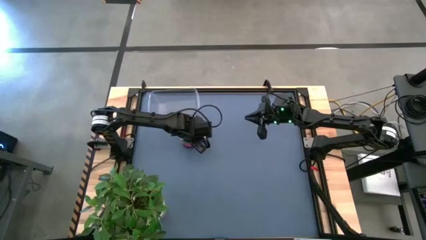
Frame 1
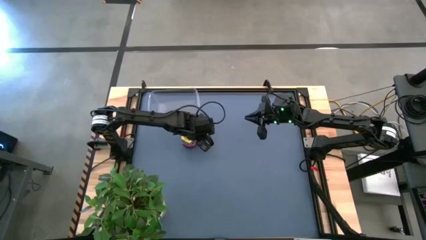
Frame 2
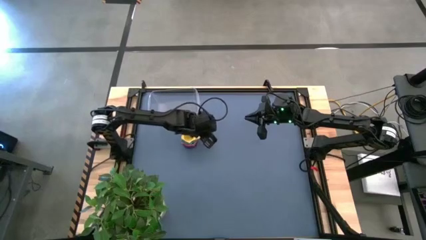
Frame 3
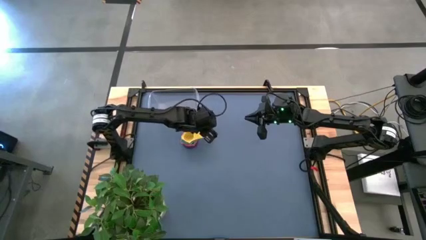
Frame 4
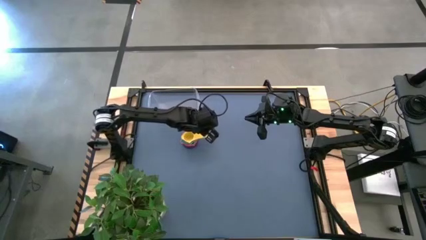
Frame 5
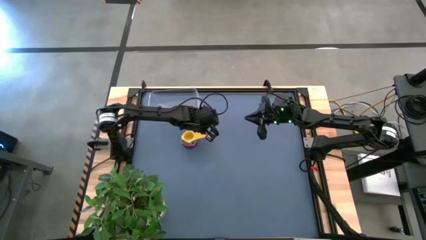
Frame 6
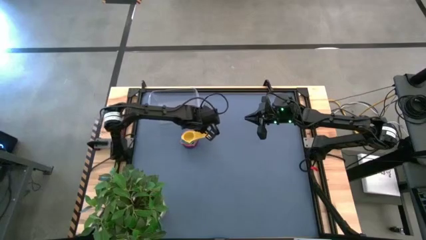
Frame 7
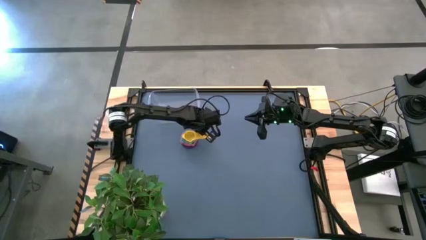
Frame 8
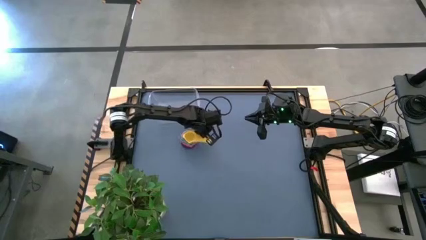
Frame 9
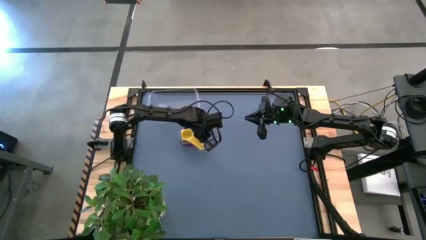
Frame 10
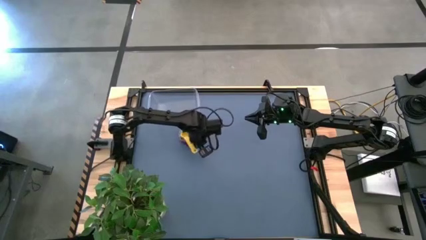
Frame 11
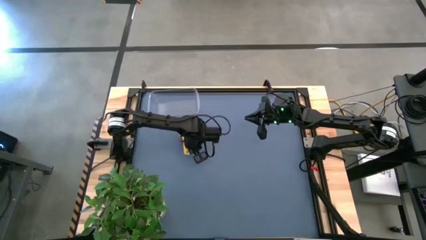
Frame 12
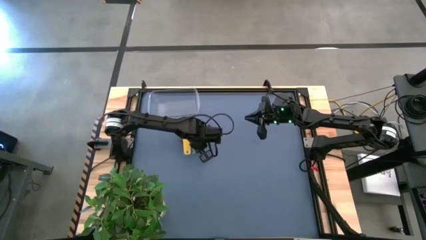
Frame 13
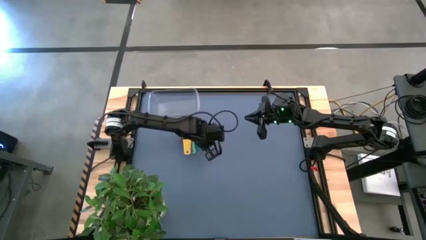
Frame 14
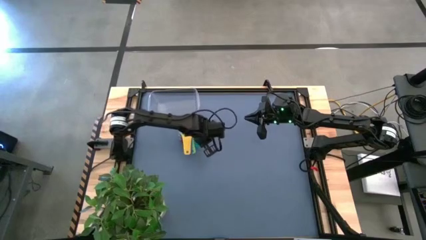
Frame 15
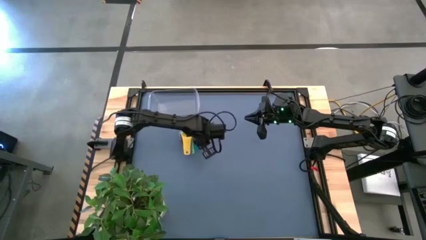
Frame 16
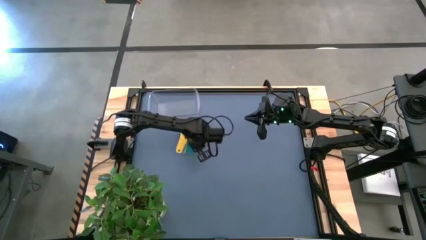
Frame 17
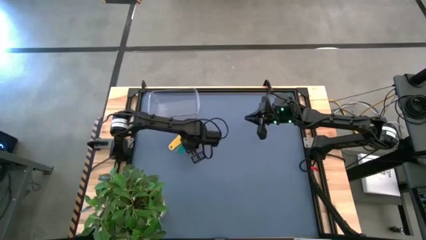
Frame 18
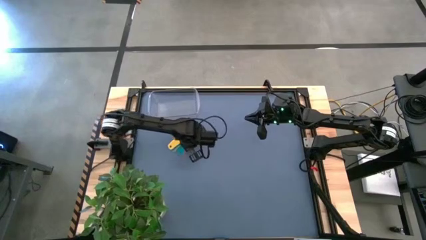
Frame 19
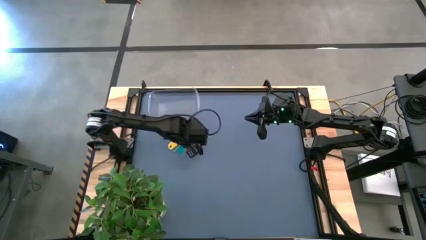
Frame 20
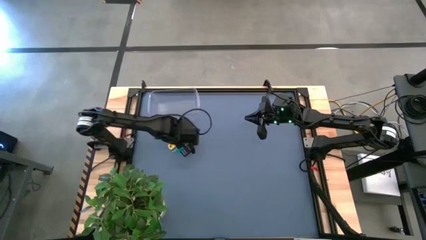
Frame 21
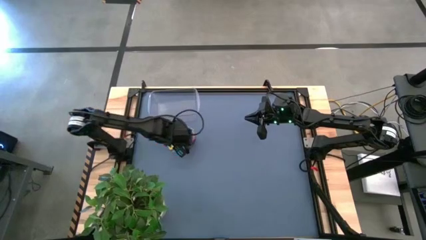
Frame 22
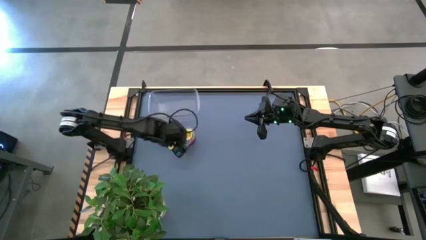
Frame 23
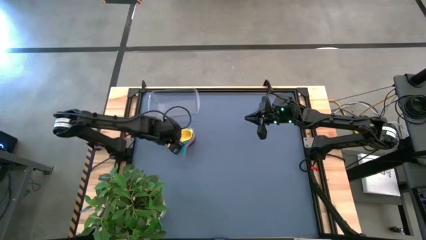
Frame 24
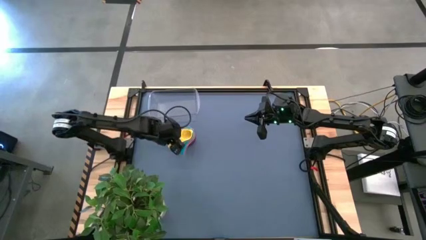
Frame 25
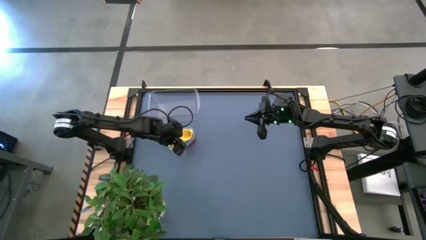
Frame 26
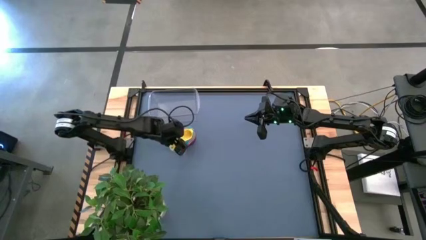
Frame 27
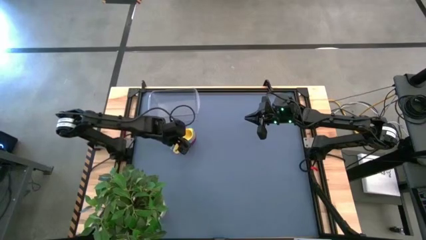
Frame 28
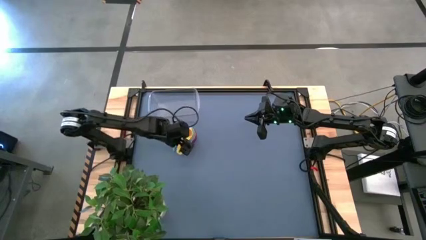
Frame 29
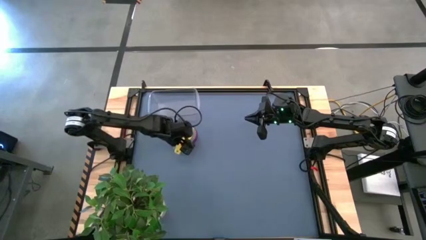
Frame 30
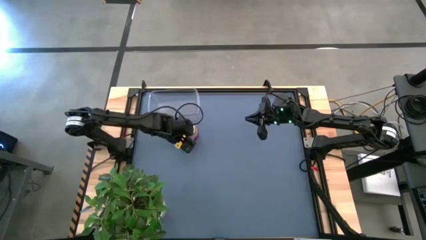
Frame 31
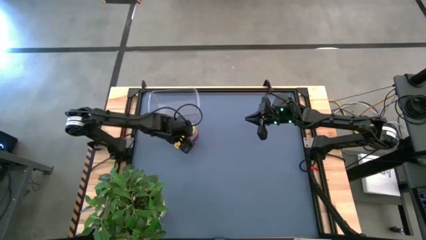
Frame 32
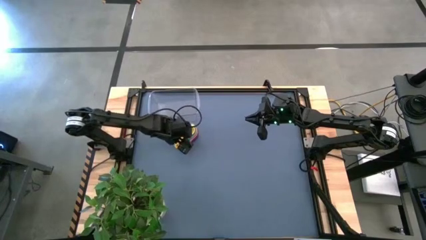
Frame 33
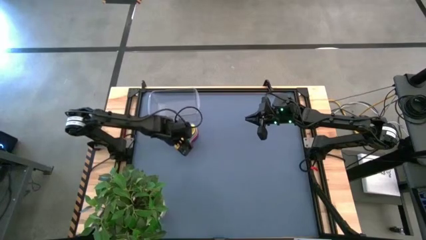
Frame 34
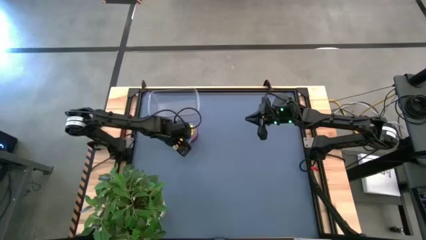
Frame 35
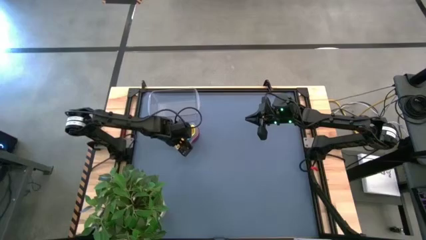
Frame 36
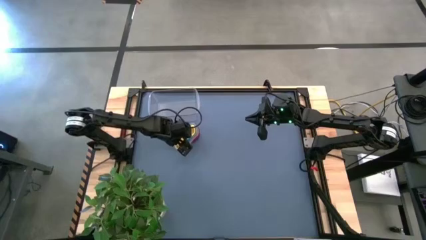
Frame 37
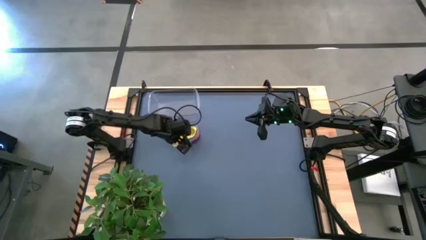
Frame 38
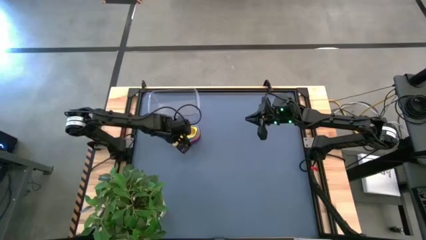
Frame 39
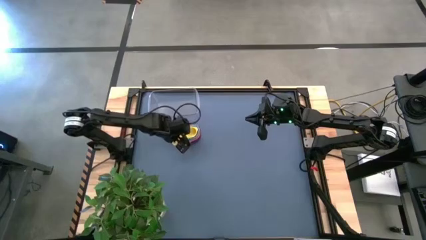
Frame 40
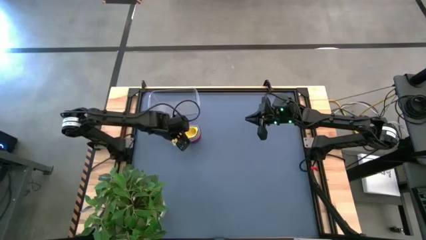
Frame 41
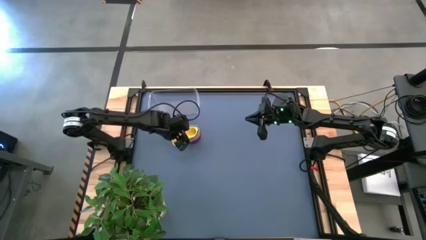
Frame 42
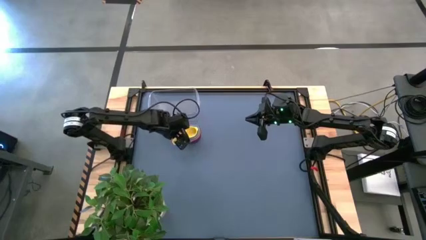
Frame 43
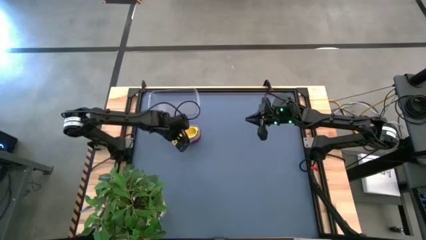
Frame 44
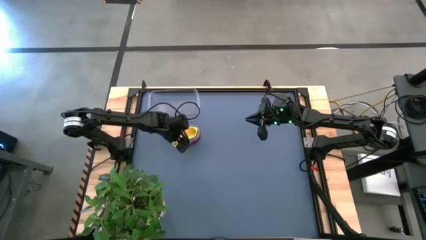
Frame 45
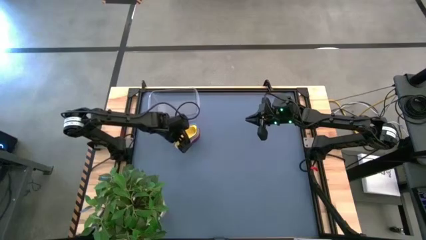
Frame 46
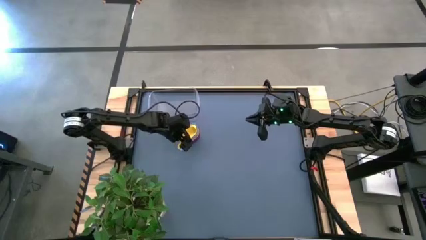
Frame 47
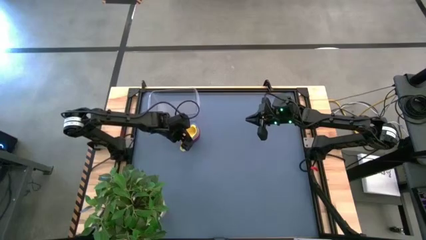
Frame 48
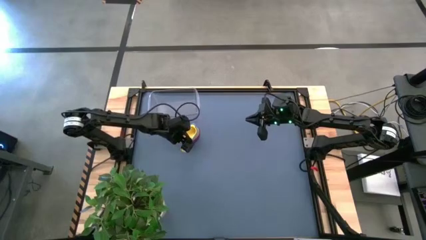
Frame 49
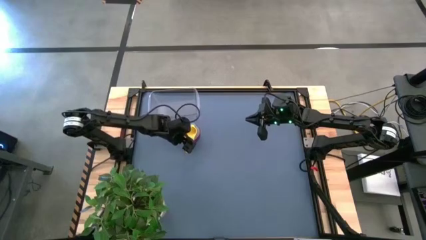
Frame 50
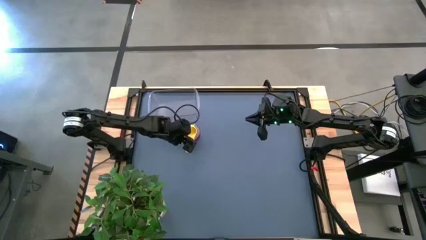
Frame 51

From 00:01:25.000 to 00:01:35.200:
Task: Nest measuring cups in basket
Adjust the nested measuring cups

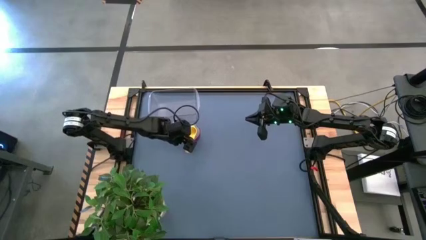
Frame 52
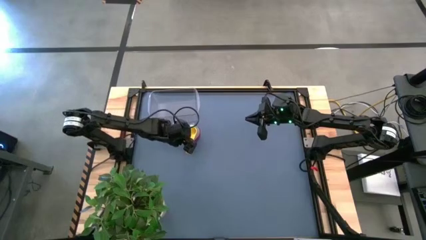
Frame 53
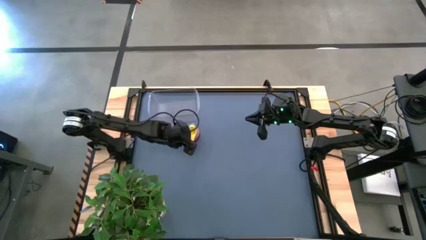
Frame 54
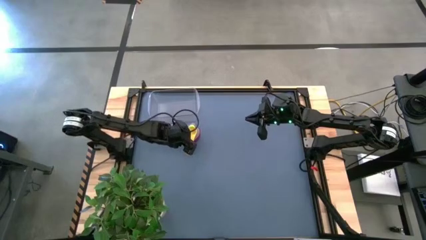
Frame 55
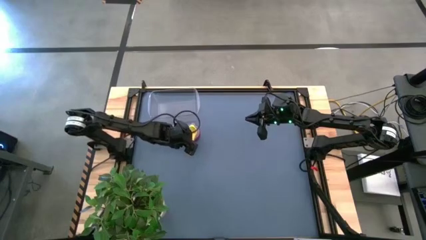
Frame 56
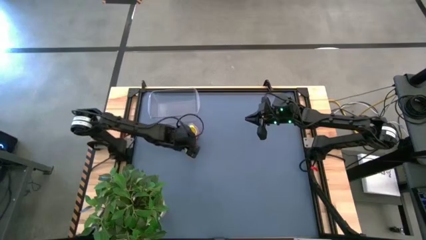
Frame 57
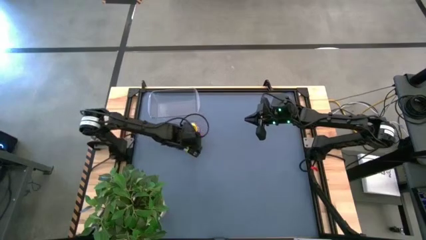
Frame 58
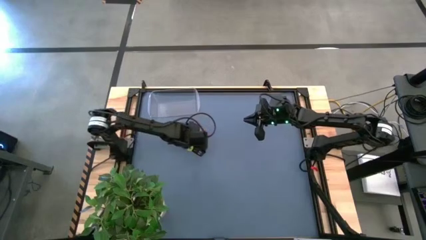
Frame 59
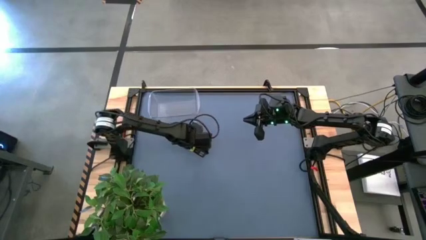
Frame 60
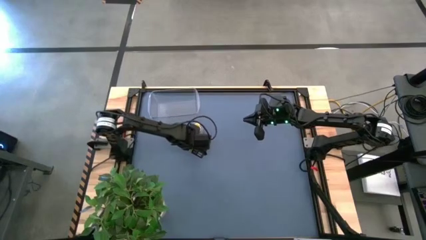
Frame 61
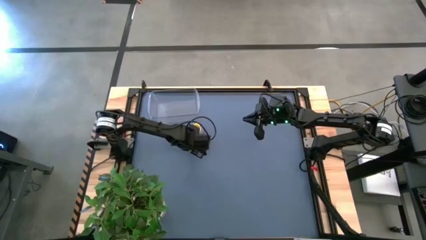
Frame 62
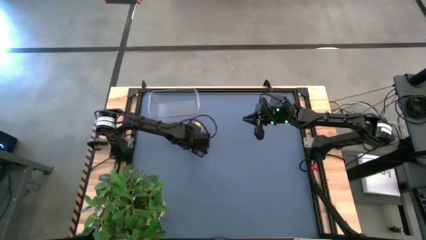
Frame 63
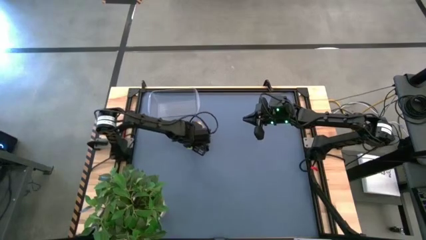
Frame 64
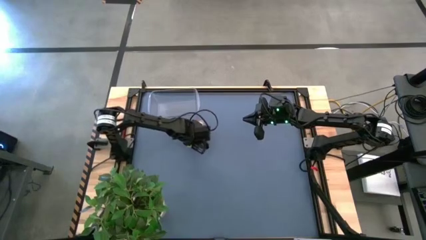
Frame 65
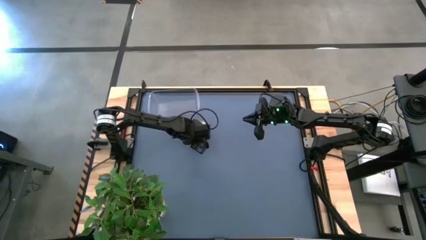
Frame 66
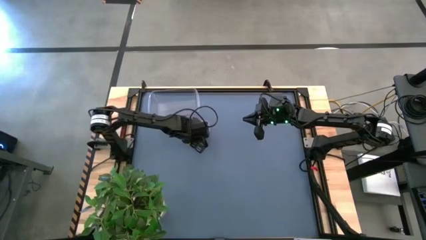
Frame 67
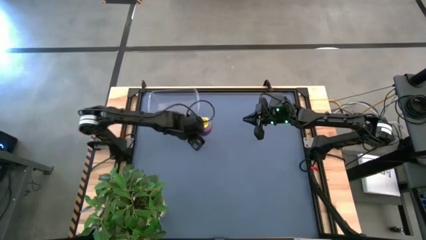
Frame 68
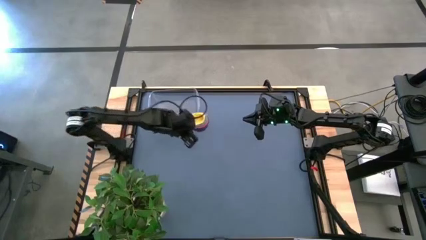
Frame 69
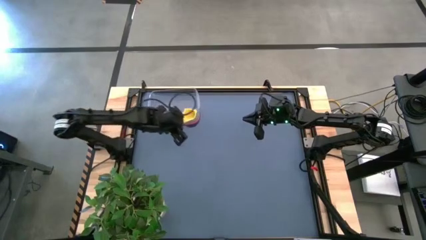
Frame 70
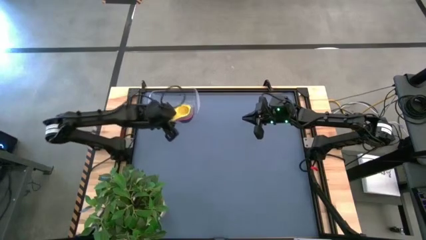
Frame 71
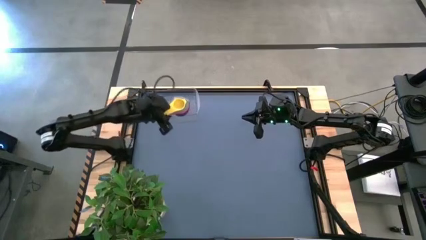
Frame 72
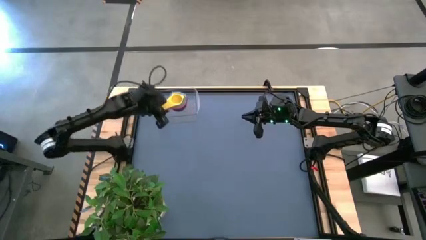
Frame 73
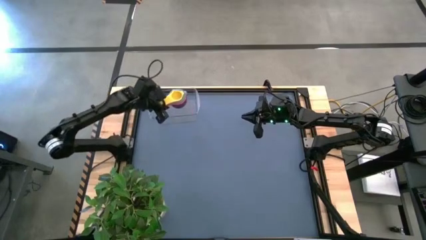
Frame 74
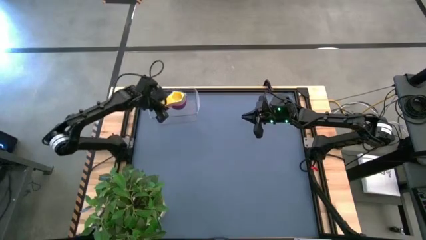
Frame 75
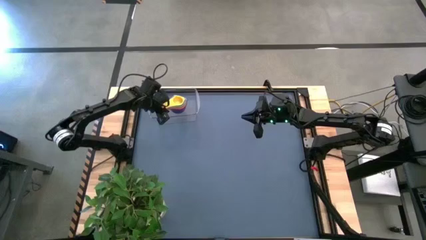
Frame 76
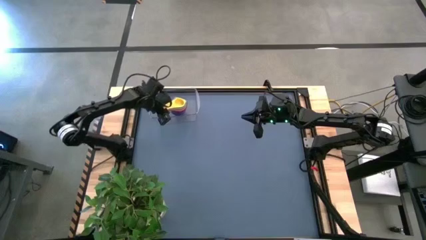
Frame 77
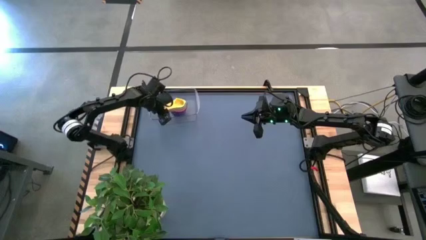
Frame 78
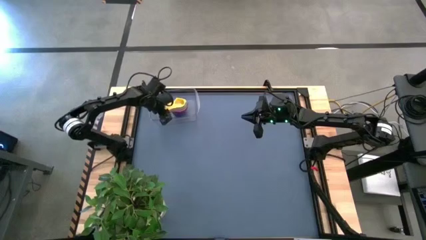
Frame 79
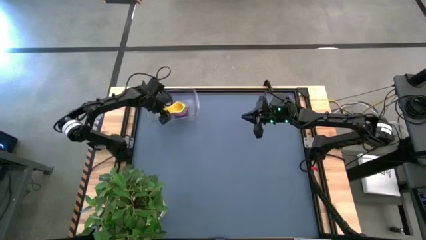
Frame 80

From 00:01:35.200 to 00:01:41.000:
Put the nested measuring cups into the transparent bin
